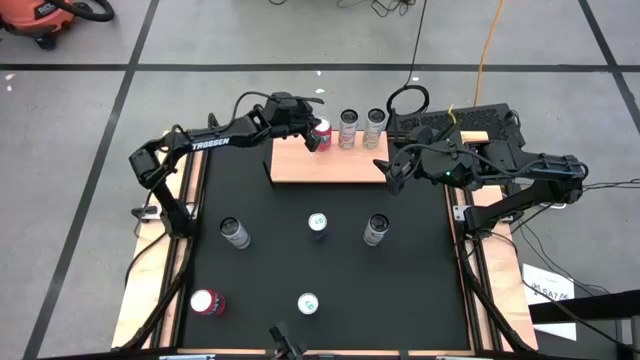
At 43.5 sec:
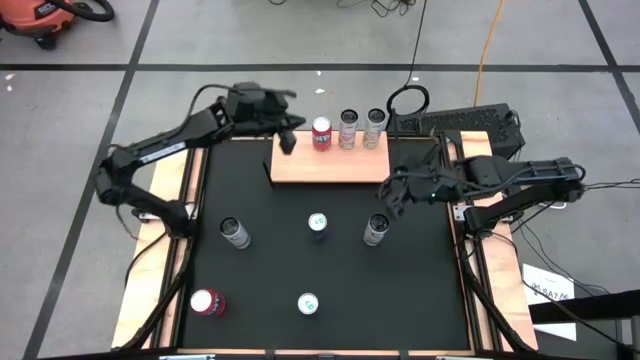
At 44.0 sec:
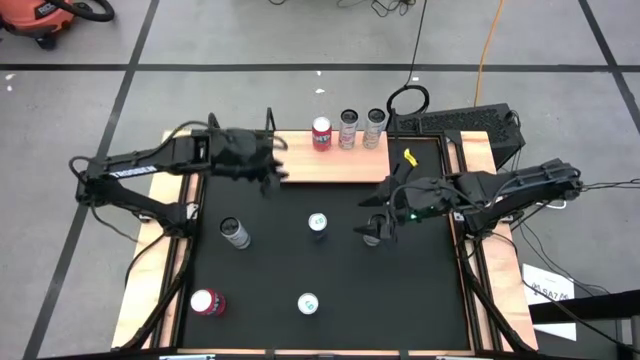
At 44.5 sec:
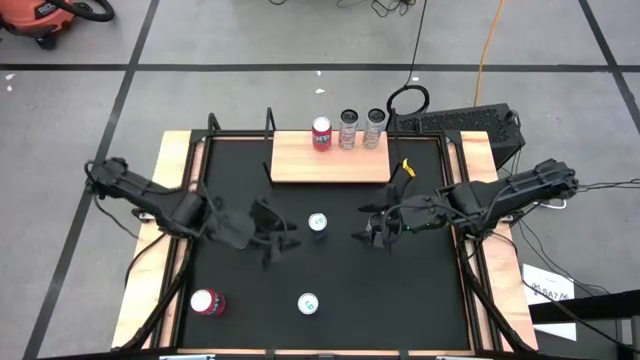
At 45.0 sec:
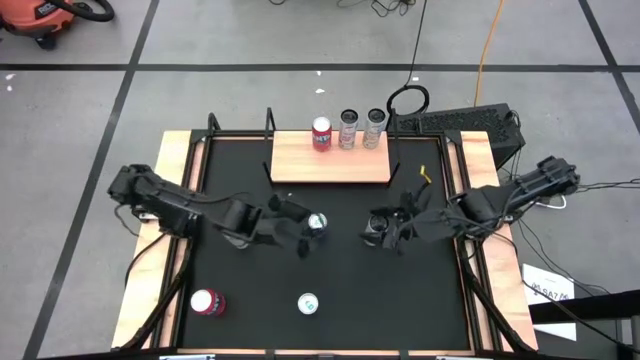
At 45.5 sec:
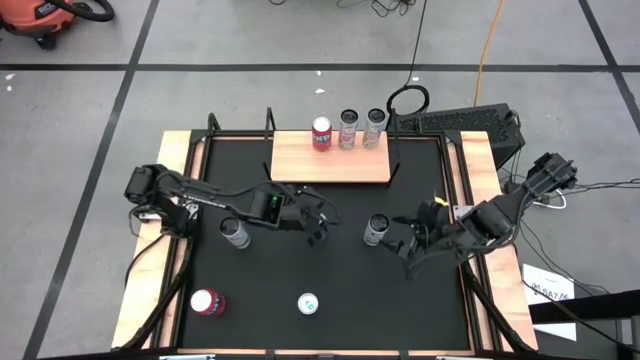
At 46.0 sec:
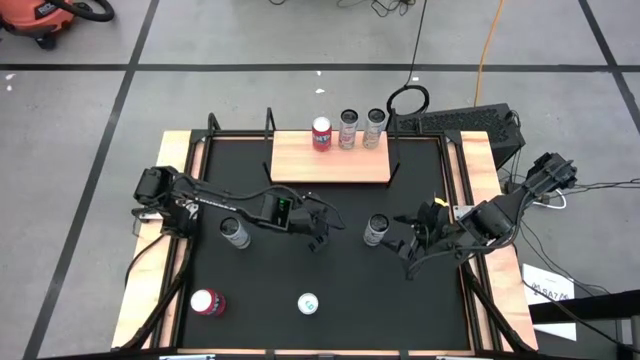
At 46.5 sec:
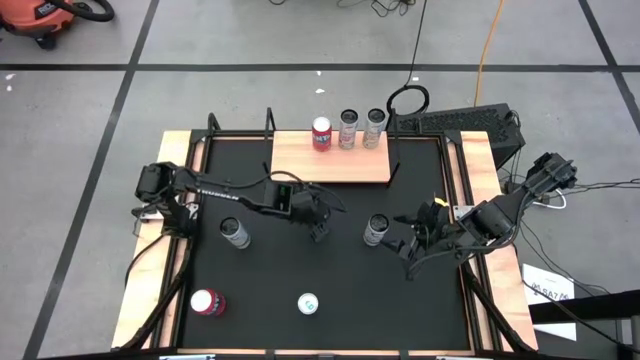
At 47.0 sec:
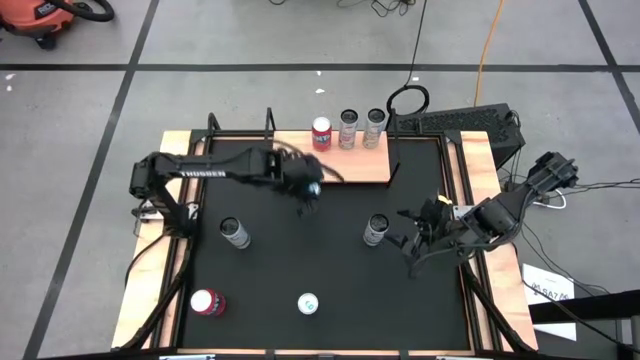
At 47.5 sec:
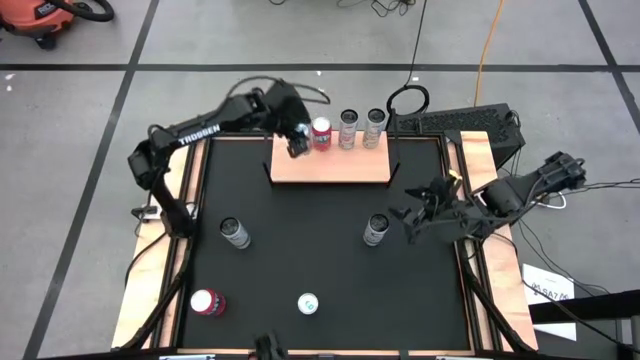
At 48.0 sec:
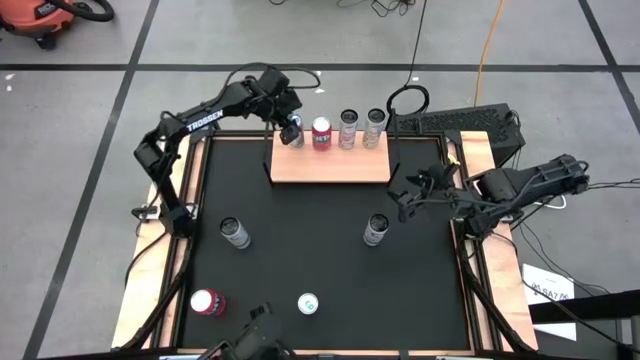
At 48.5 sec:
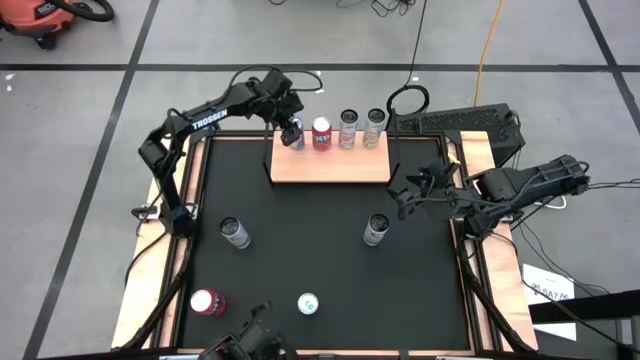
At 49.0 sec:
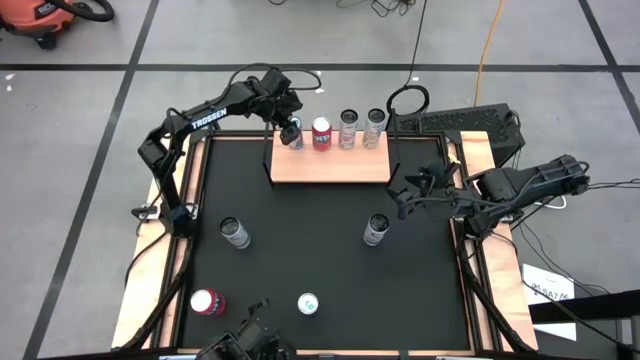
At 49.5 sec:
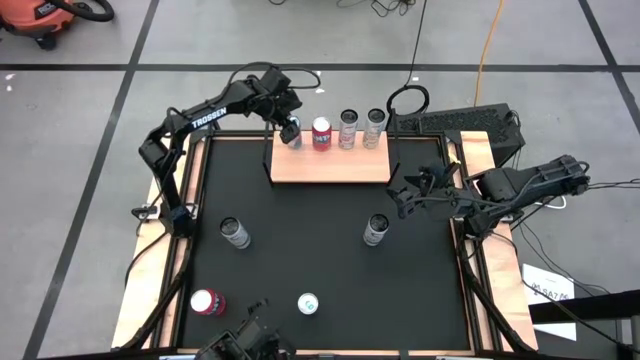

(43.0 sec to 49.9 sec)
Task: Place canned beverage on shelf
Put the blue soda can on the shelf

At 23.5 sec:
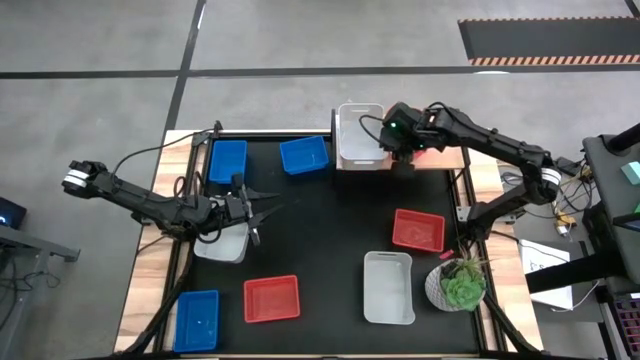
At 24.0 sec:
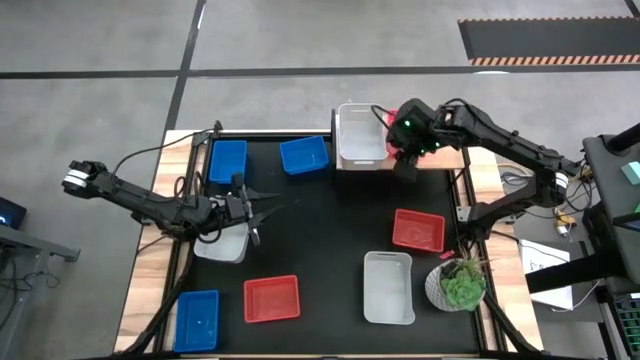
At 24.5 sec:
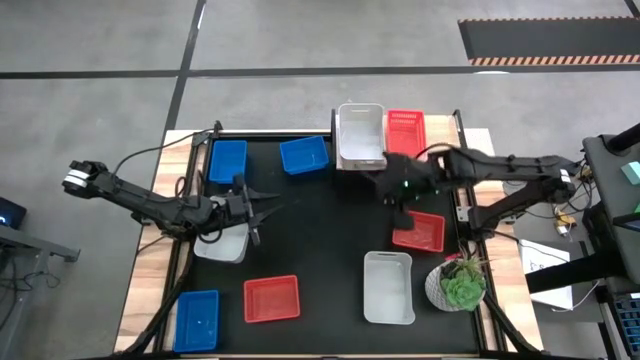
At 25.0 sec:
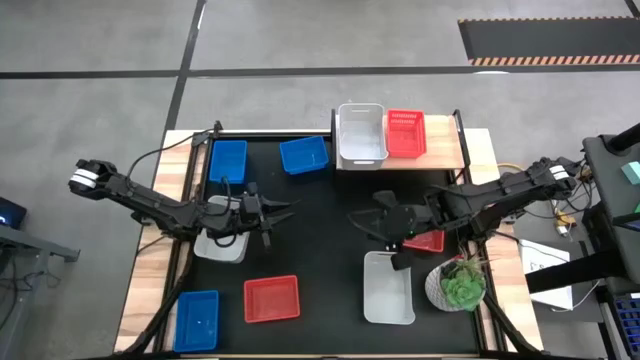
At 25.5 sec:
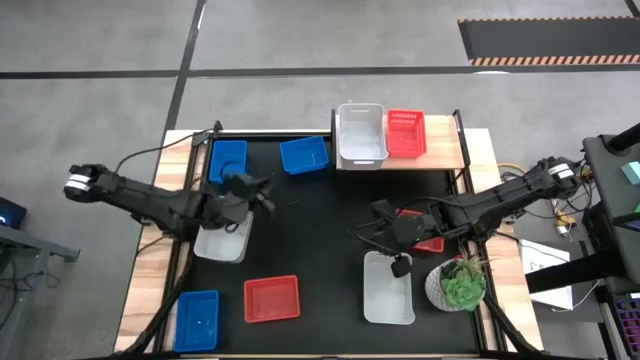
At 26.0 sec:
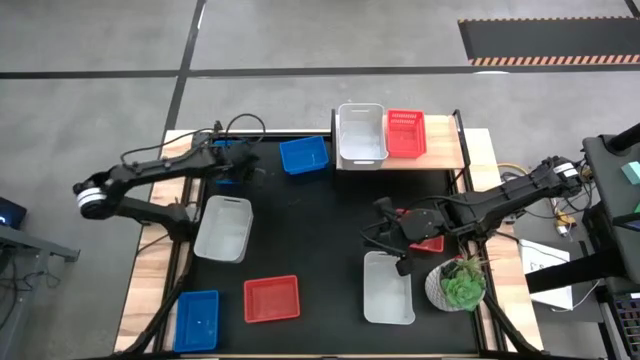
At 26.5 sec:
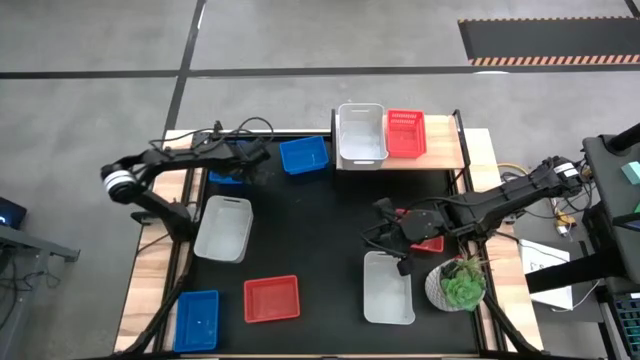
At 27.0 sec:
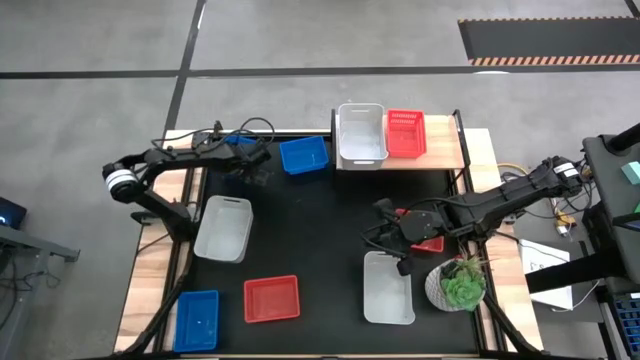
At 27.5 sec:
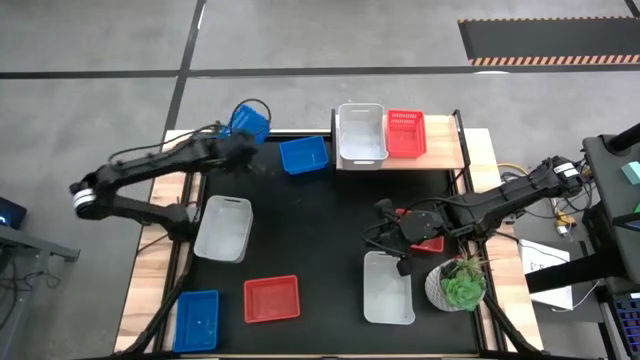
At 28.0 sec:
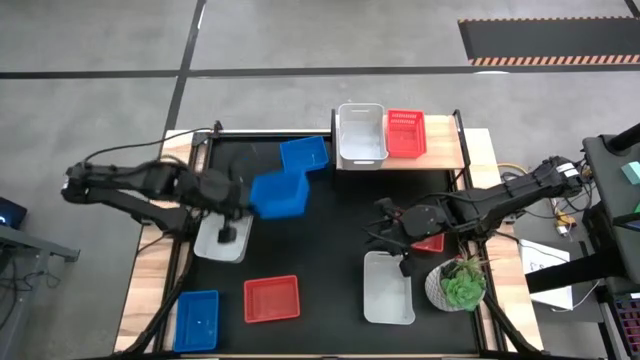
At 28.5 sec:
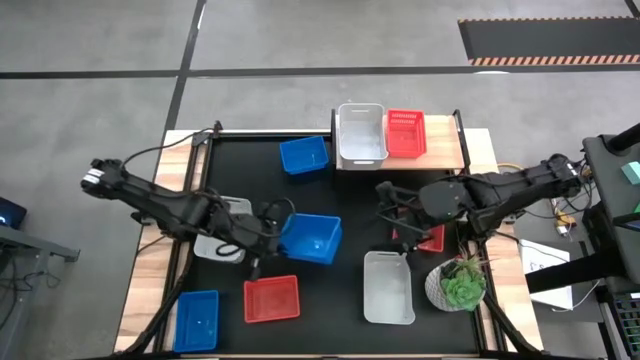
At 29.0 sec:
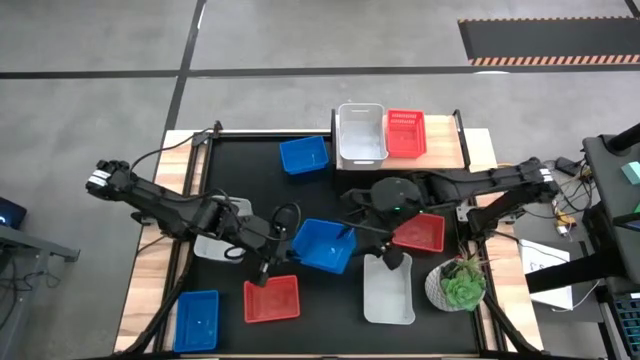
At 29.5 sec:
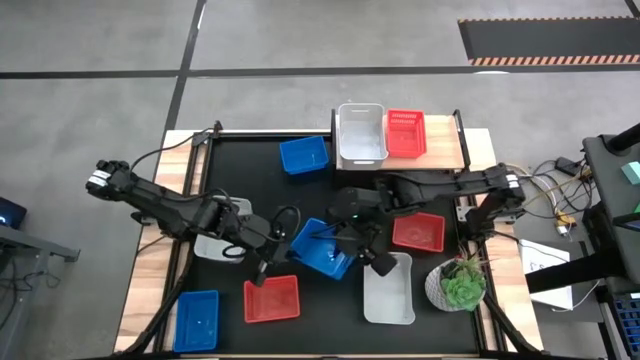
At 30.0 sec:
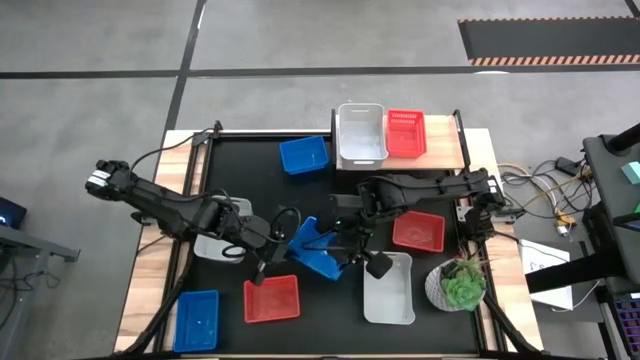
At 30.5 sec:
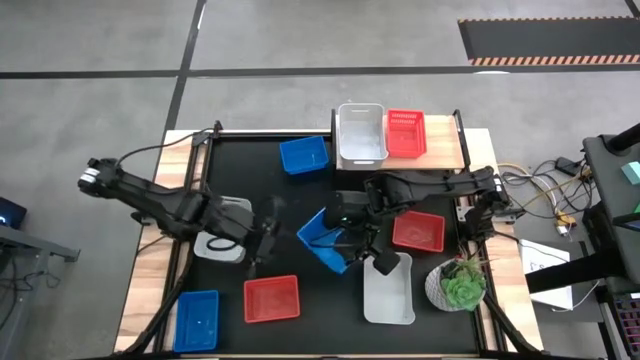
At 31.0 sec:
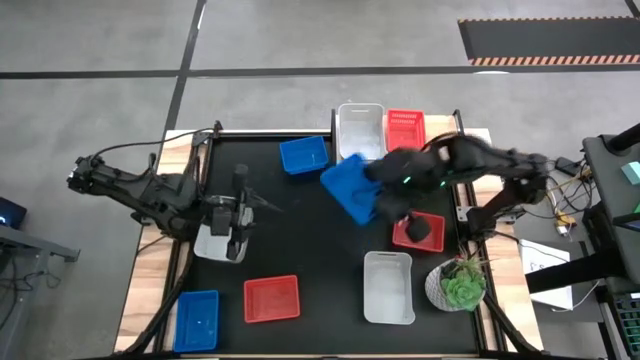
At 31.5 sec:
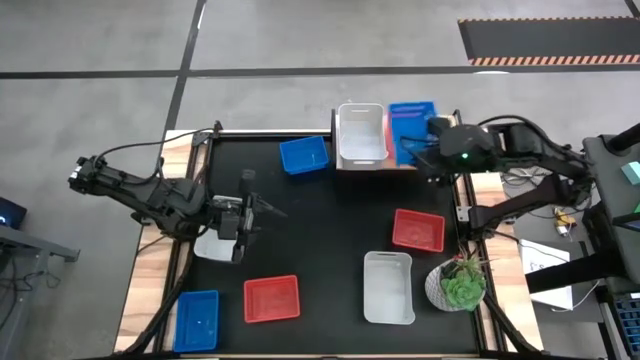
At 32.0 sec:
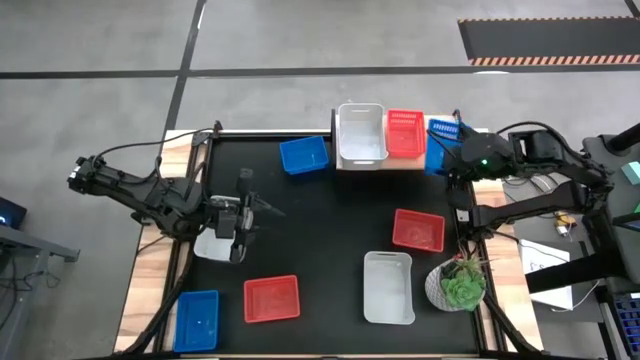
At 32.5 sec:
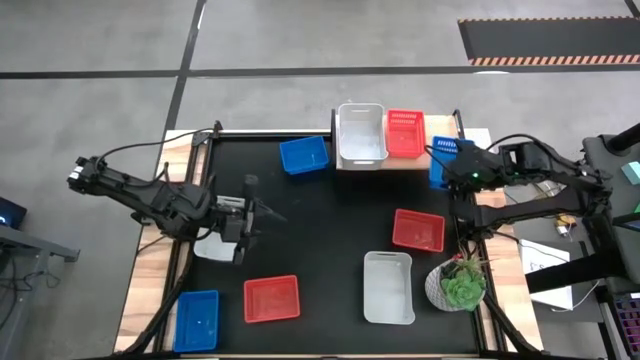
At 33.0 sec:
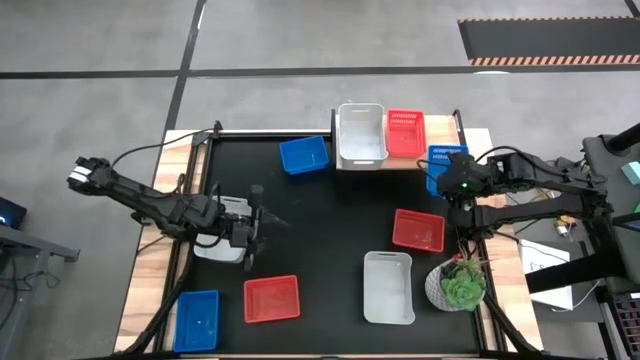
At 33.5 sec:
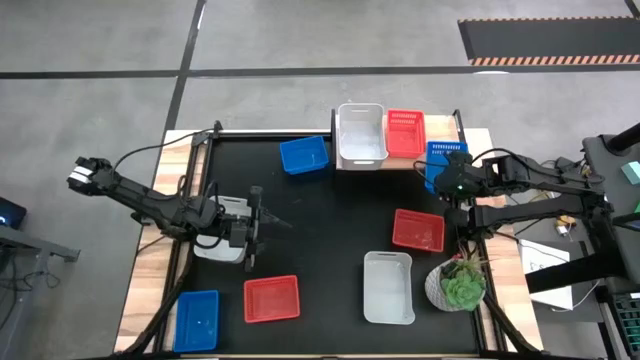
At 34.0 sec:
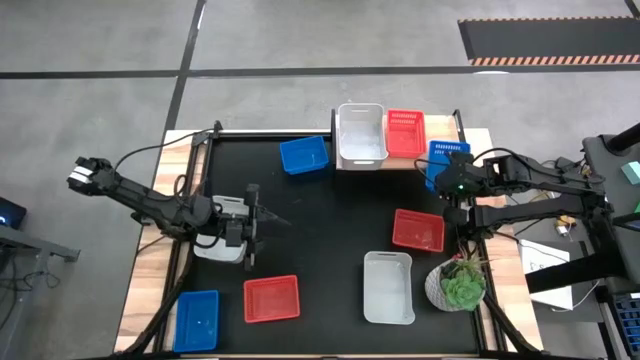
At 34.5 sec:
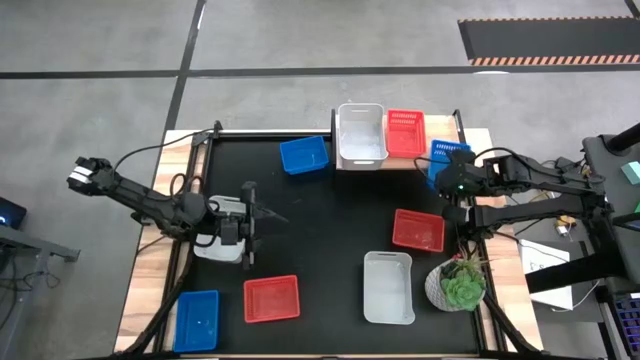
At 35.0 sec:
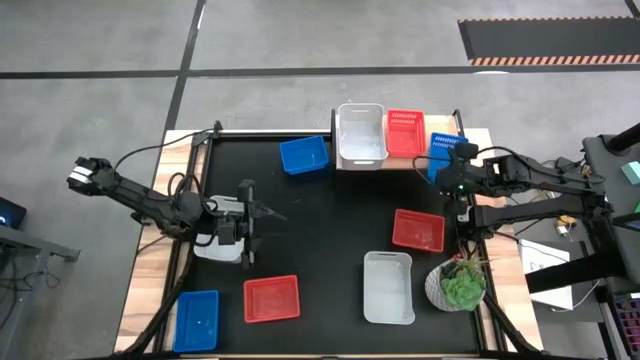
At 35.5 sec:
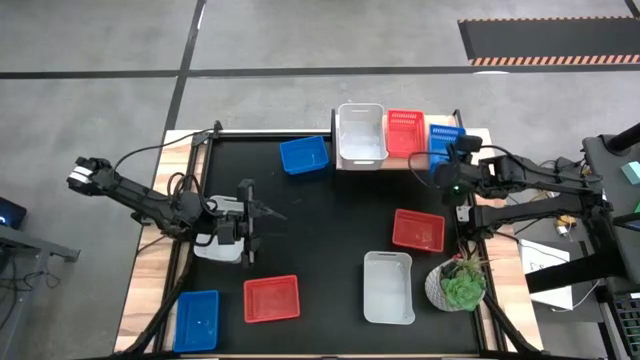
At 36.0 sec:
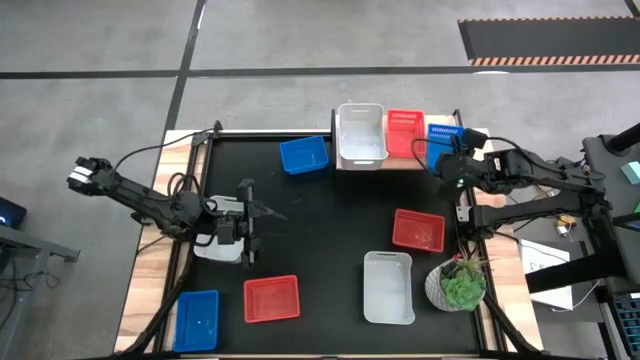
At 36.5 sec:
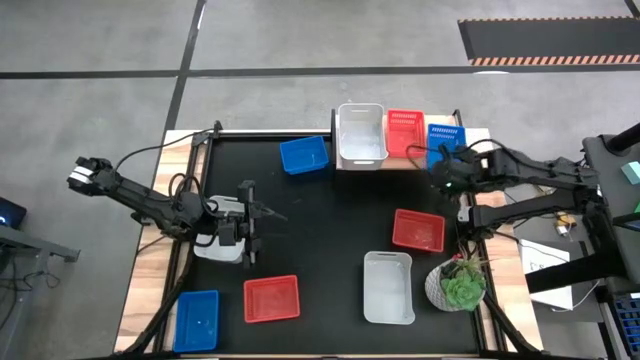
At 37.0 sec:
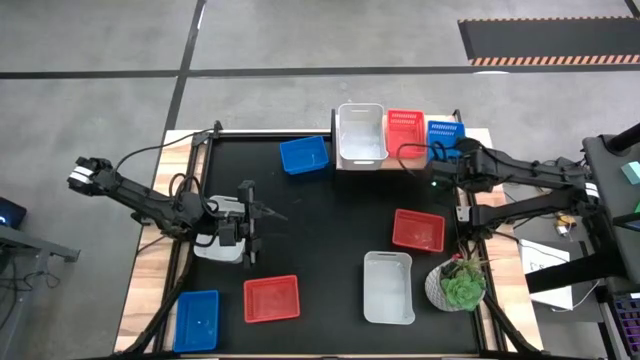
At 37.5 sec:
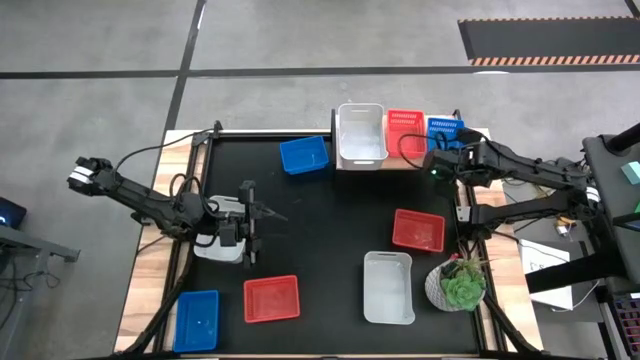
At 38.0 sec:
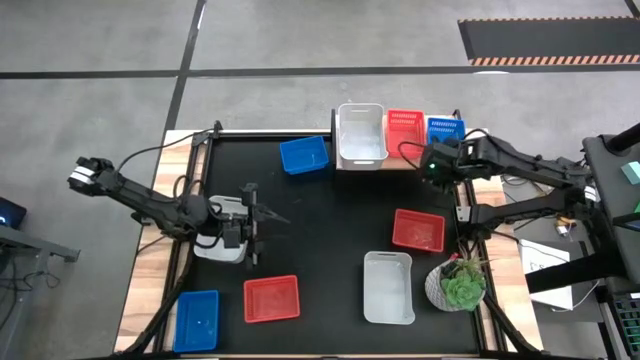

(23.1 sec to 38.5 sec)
Task: Stack baskets on shelf by color
Put the top left blue bin on the shelf
